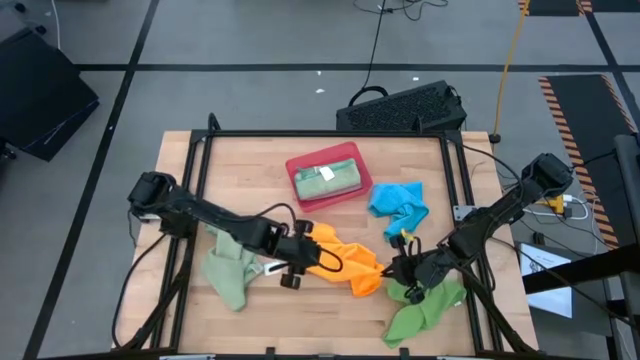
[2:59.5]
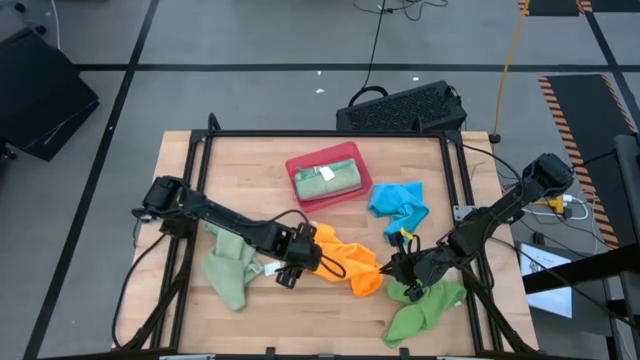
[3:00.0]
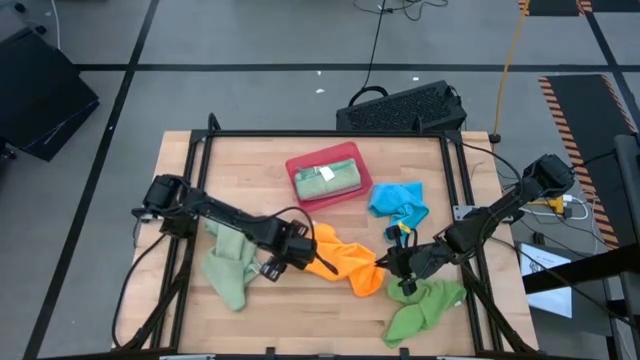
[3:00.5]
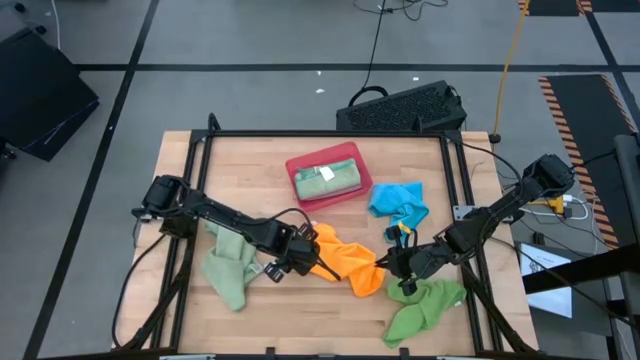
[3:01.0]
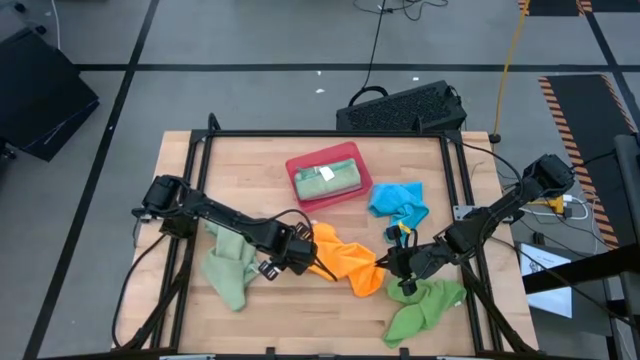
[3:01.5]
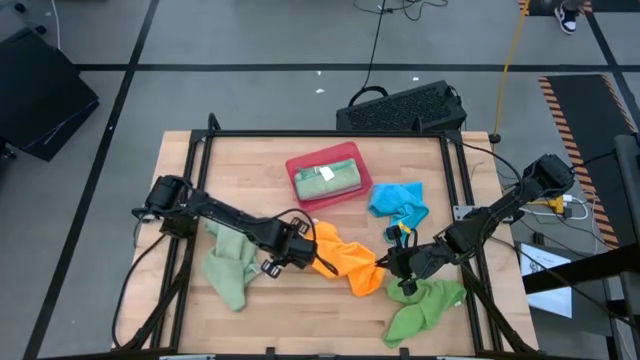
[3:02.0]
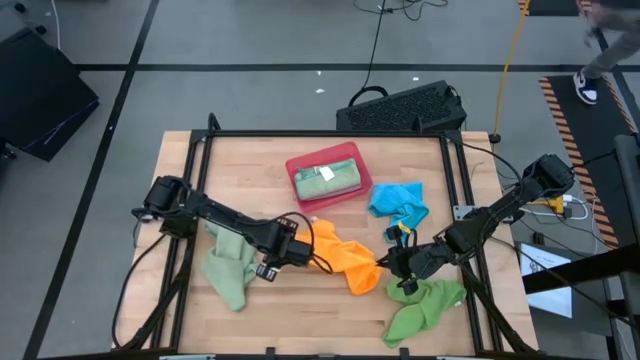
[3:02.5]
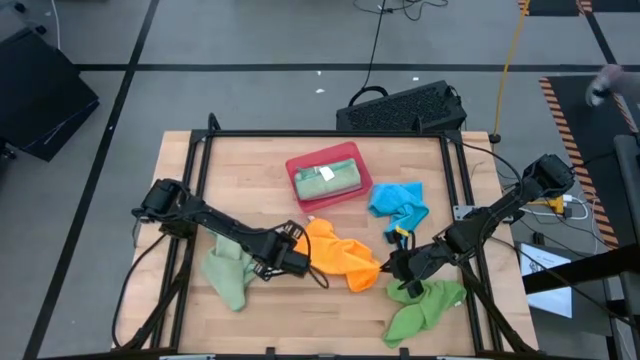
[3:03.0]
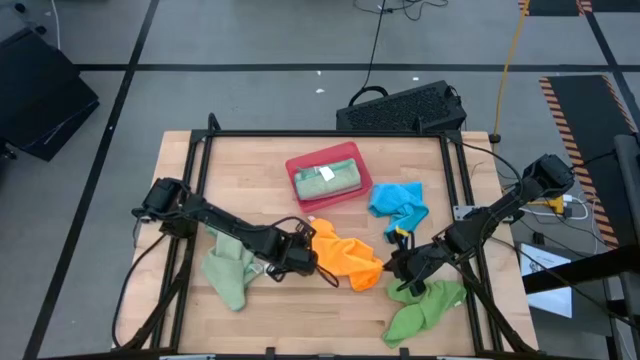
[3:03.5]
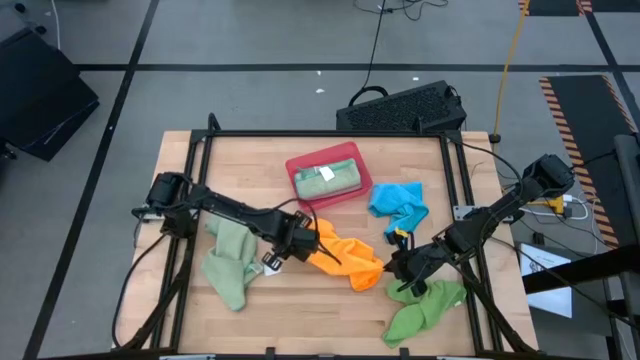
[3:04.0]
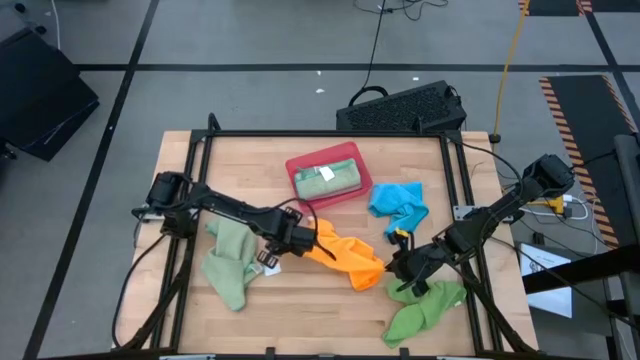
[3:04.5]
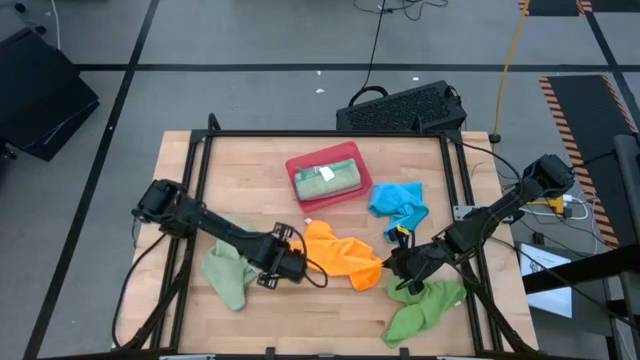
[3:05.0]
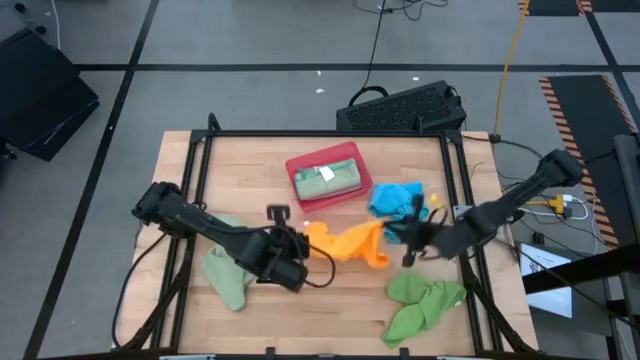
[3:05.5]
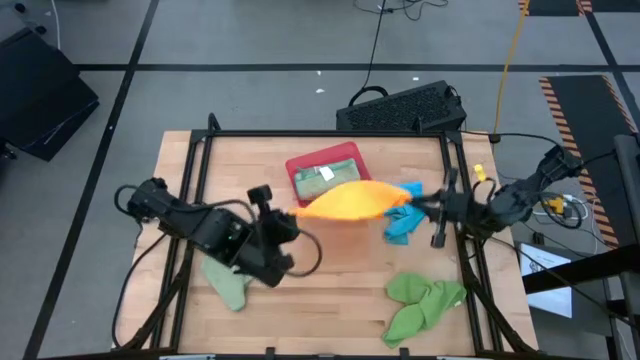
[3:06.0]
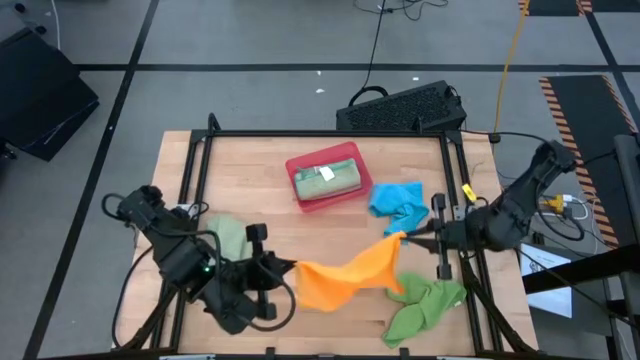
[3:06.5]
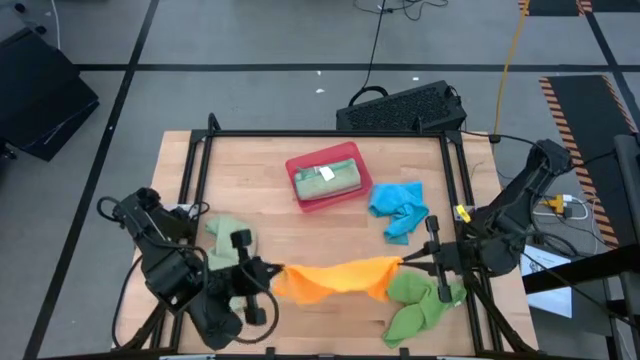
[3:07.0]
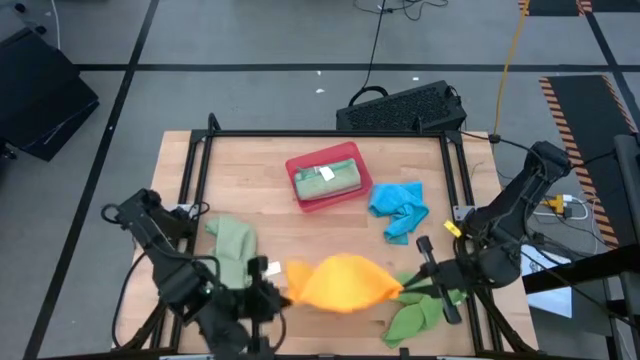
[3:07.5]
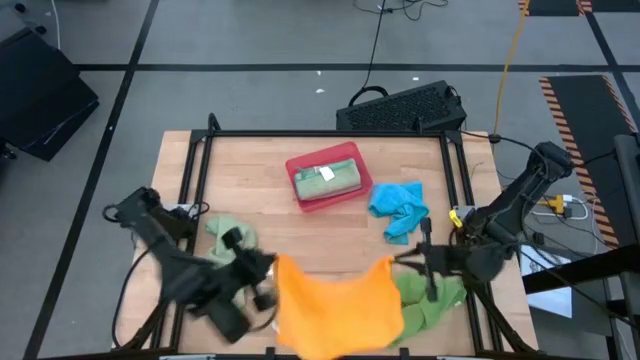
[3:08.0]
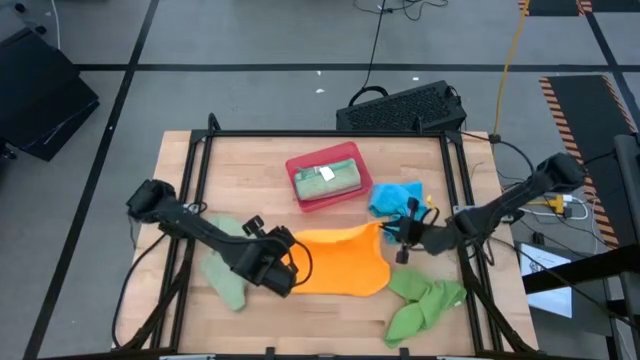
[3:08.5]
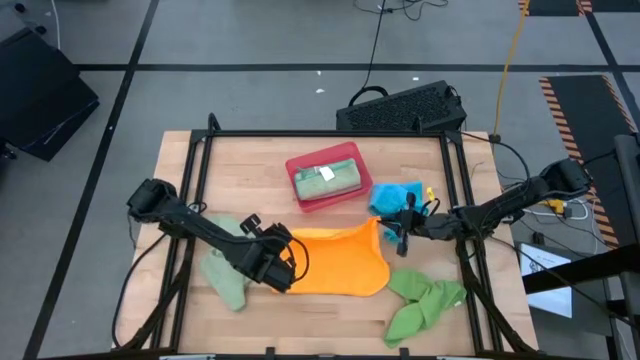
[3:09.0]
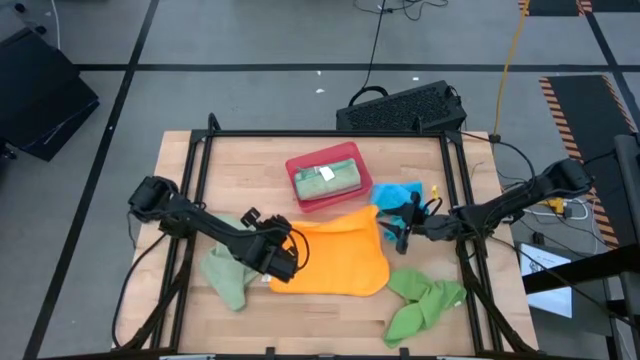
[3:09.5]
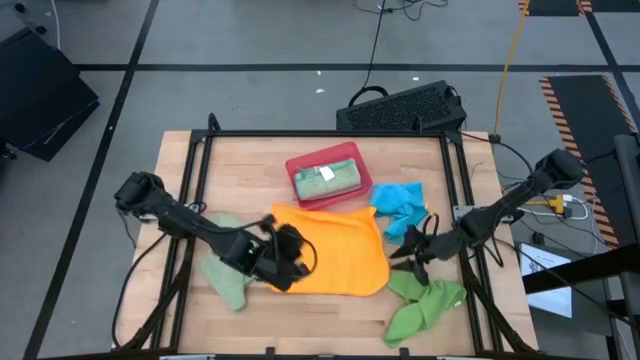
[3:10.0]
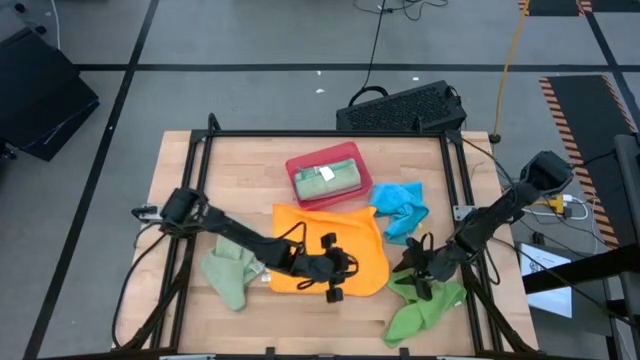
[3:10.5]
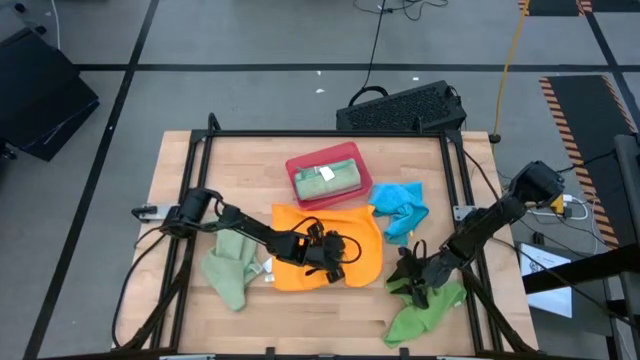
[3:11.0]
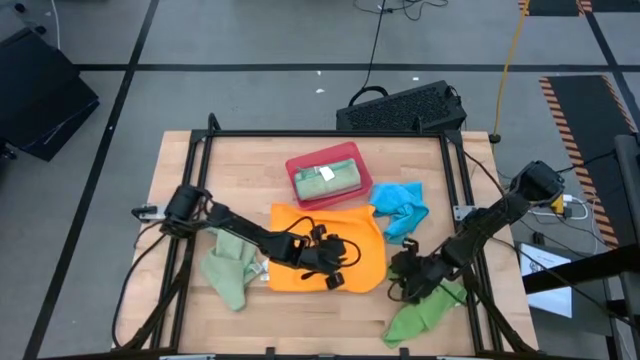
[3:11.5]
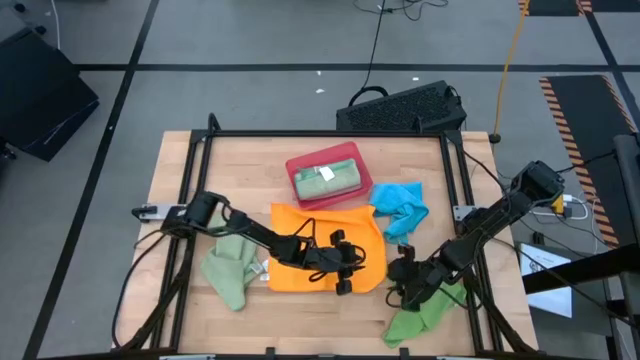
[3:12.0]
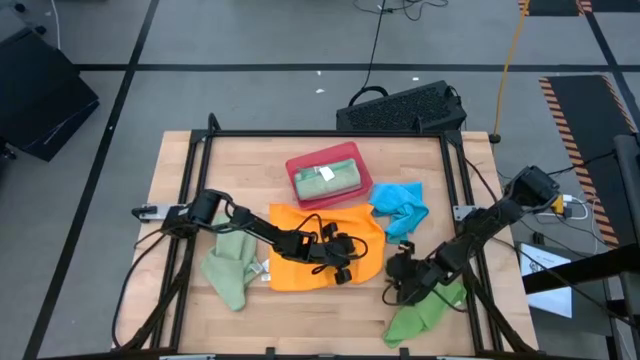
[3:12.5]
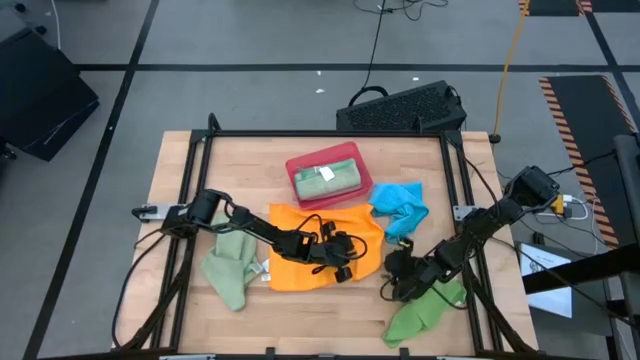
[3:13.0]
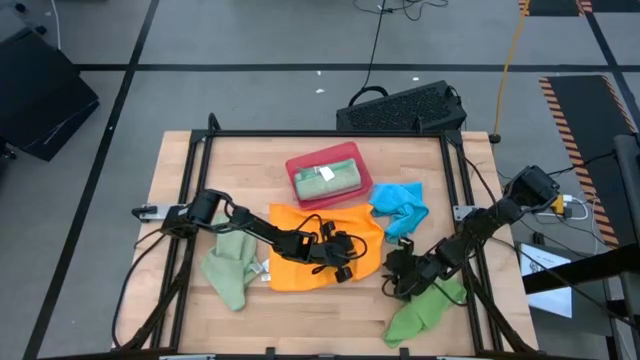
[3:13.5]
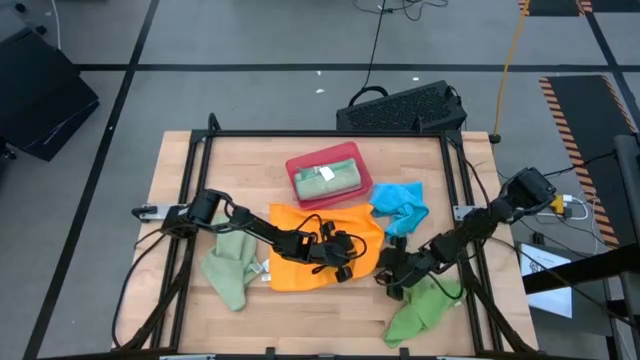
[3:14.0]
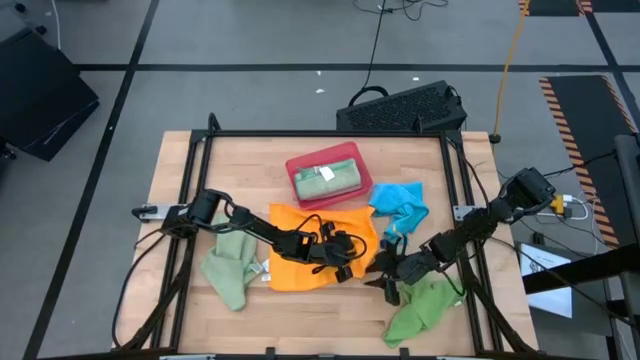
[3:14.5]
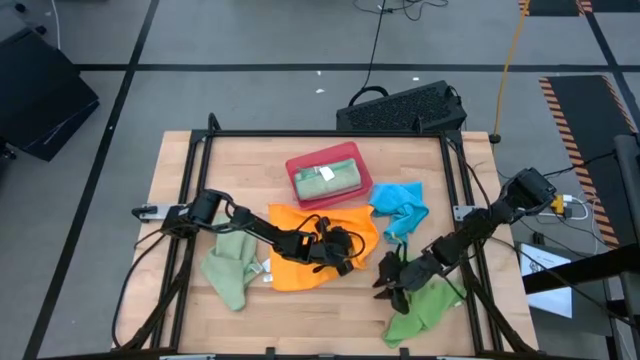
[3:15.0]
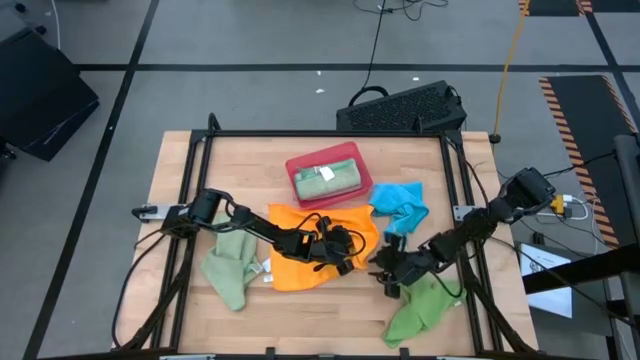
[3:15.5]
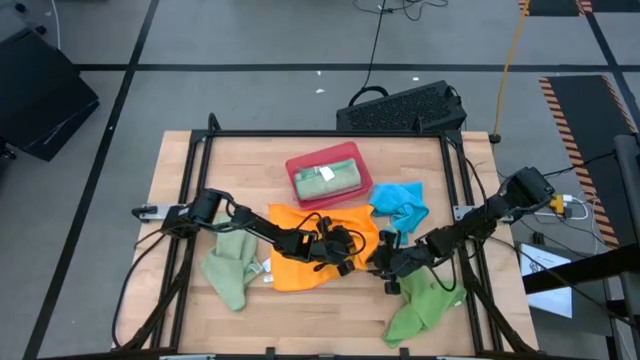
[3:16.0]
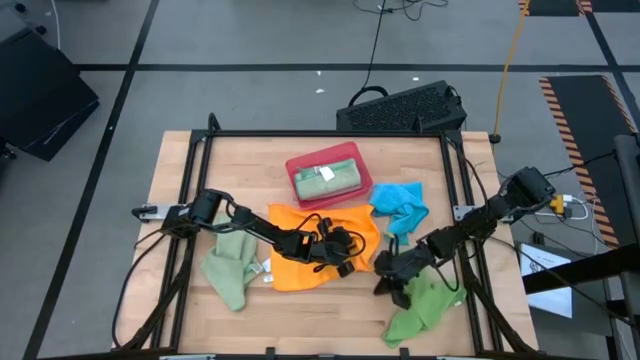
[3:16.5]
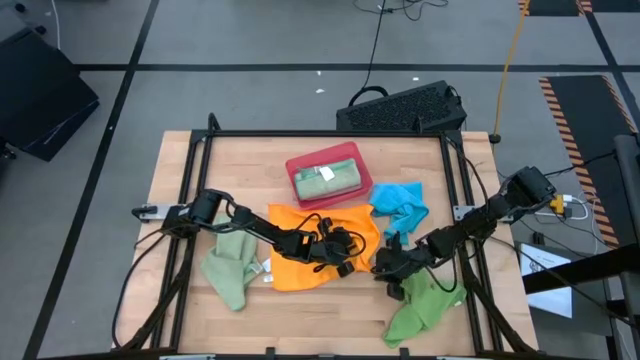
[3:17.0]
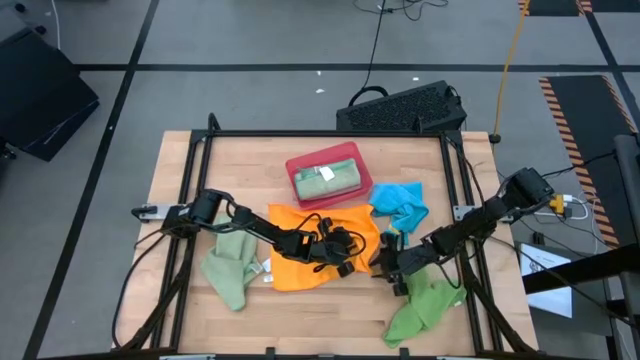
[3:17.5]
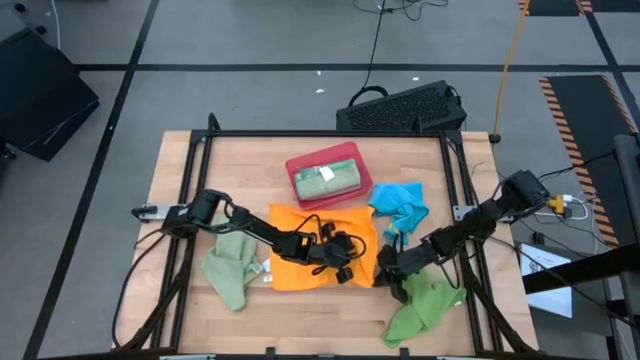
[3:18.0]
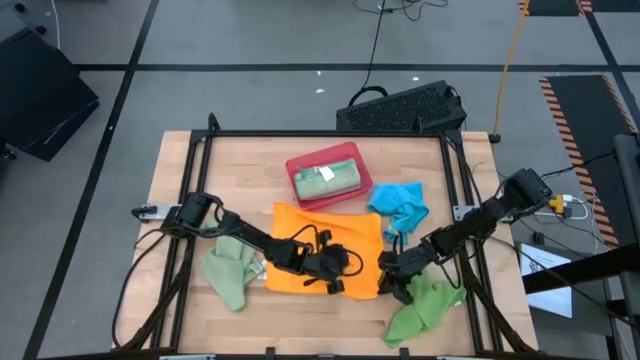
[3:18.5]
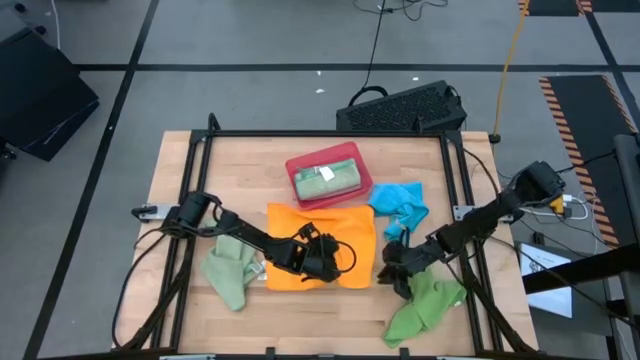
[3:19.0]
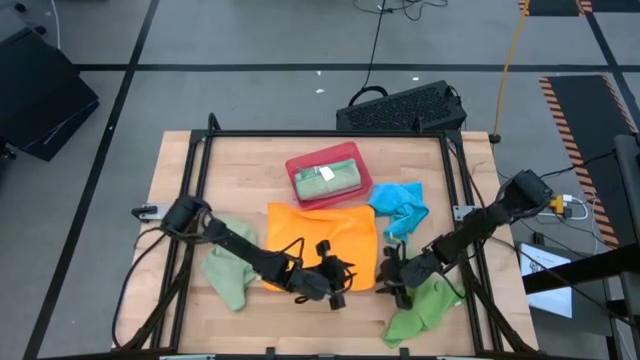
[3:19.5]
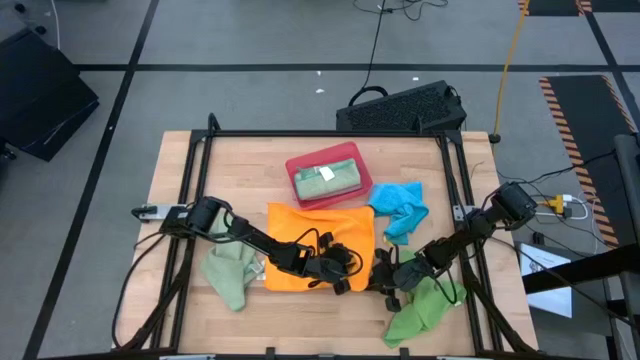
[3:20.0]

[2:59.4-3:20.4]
Task: Fold microfiber towels
Fold the yellow microfiber cloth
